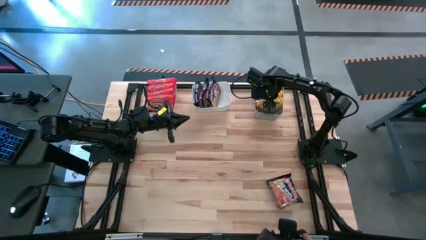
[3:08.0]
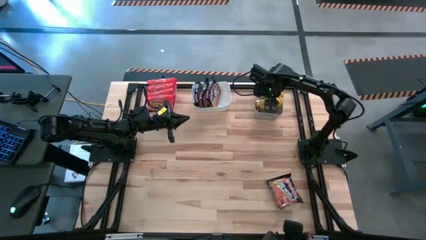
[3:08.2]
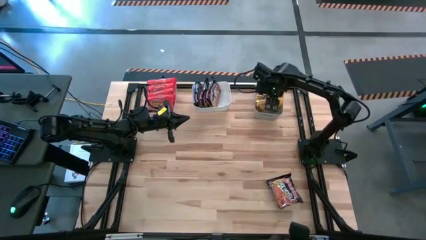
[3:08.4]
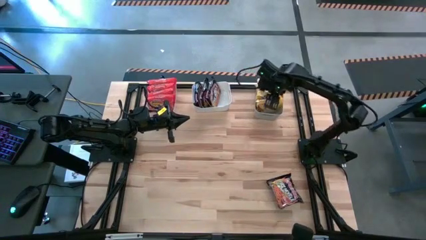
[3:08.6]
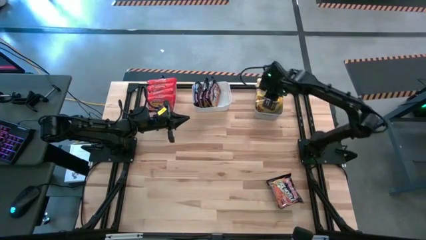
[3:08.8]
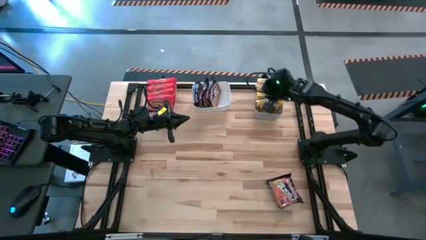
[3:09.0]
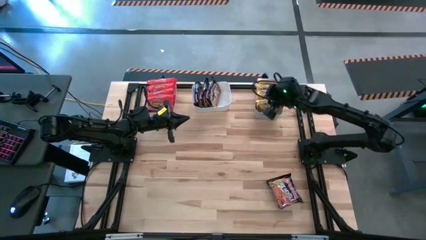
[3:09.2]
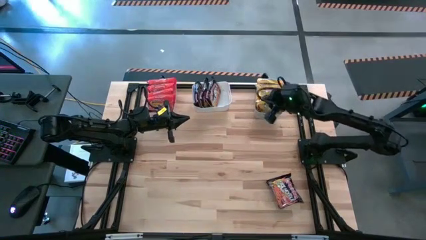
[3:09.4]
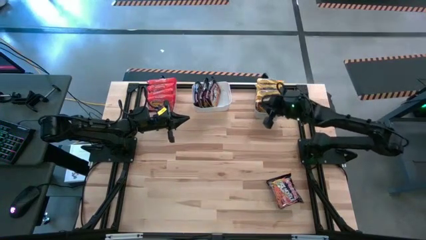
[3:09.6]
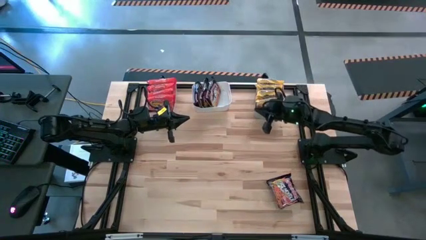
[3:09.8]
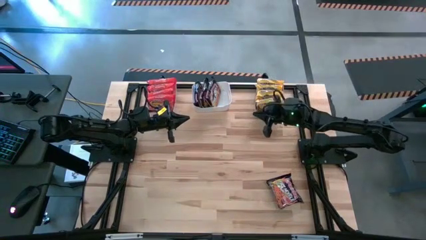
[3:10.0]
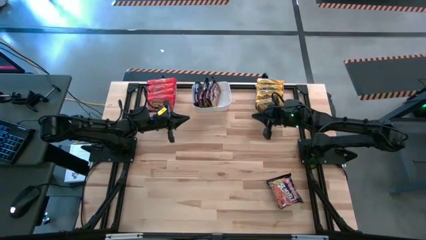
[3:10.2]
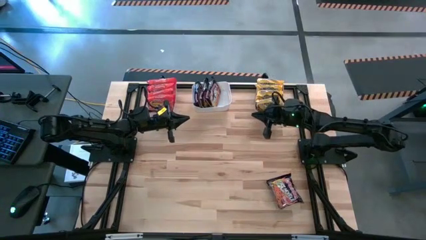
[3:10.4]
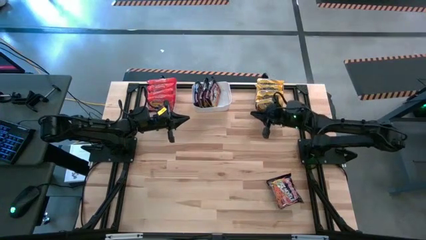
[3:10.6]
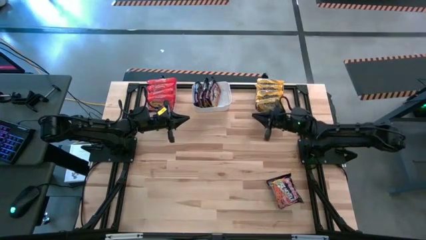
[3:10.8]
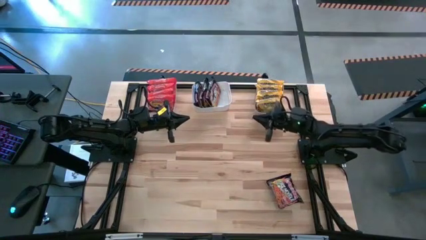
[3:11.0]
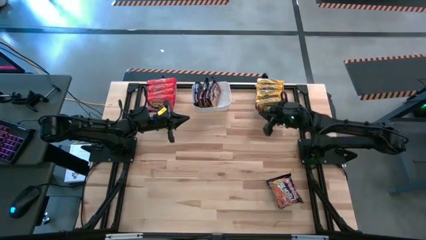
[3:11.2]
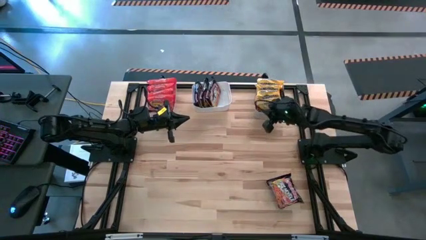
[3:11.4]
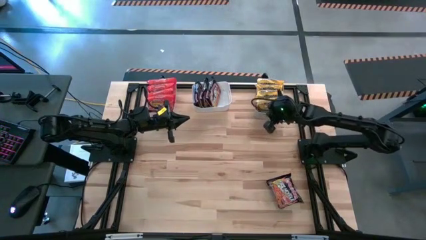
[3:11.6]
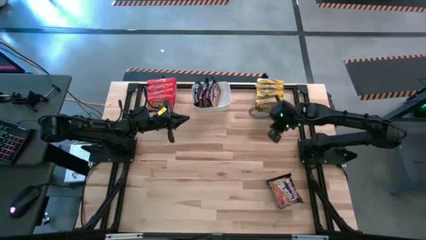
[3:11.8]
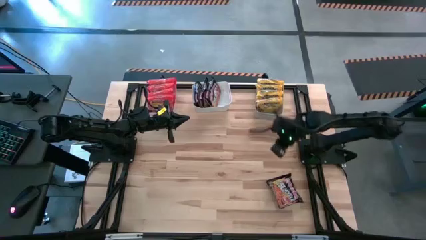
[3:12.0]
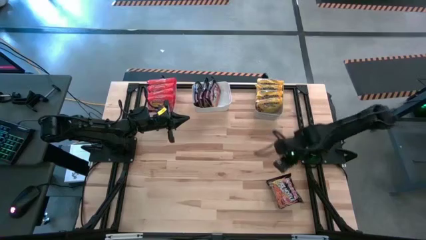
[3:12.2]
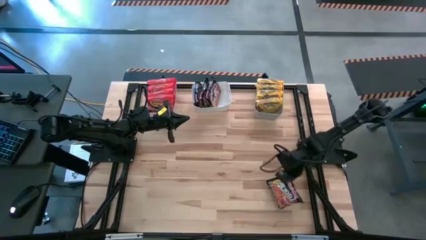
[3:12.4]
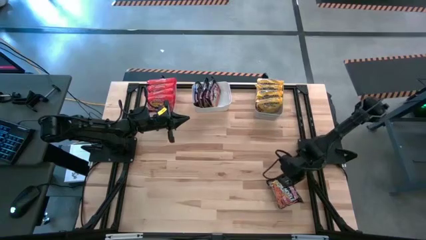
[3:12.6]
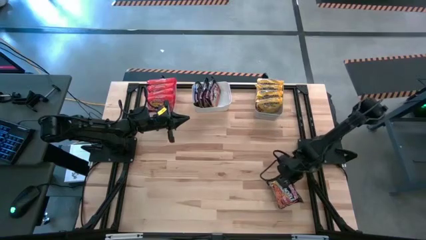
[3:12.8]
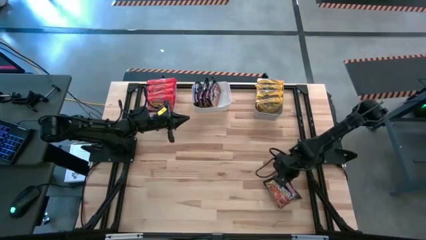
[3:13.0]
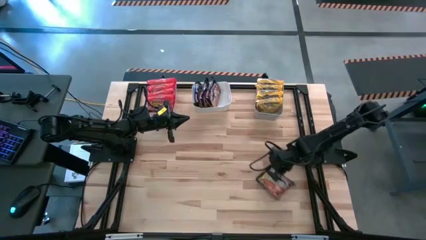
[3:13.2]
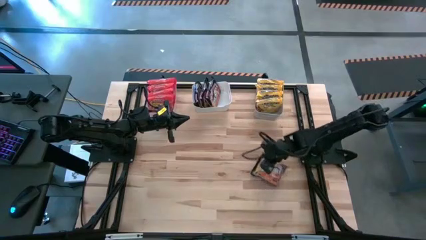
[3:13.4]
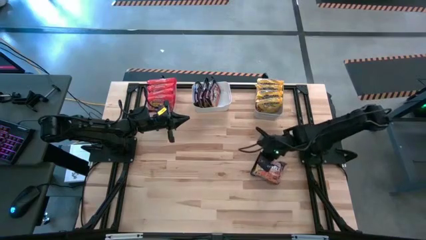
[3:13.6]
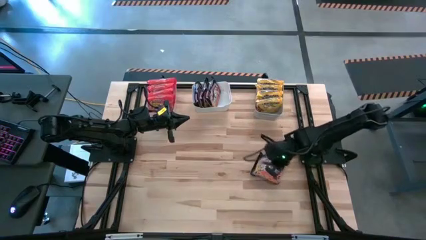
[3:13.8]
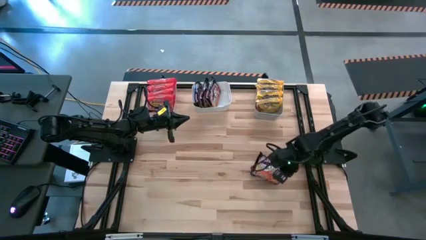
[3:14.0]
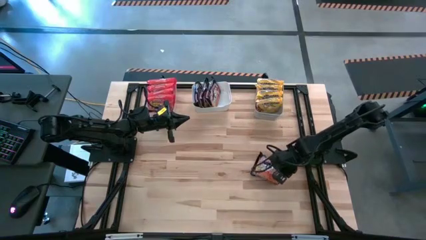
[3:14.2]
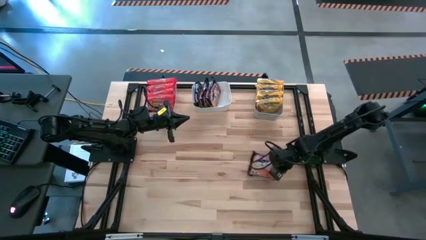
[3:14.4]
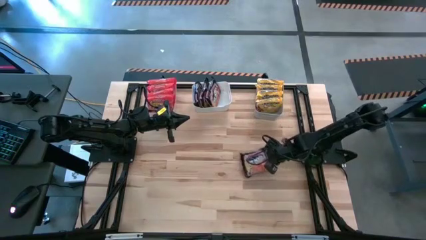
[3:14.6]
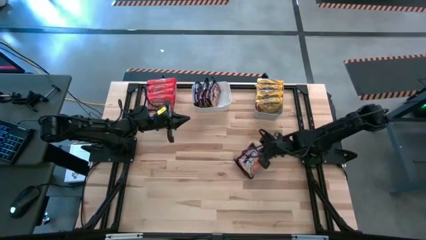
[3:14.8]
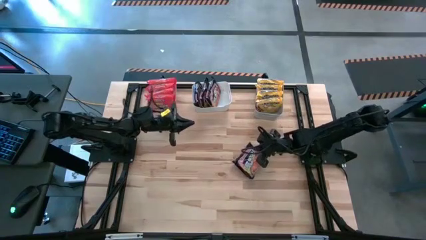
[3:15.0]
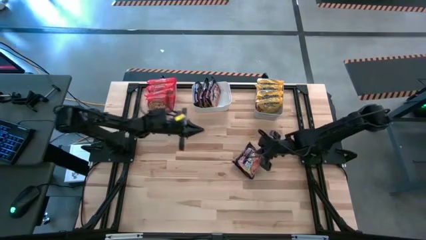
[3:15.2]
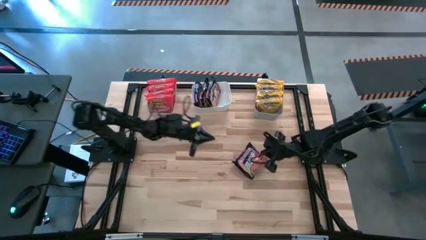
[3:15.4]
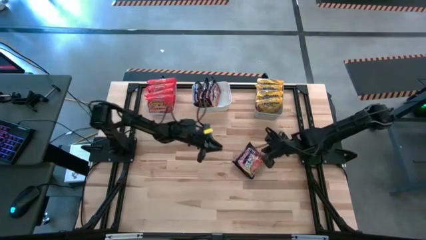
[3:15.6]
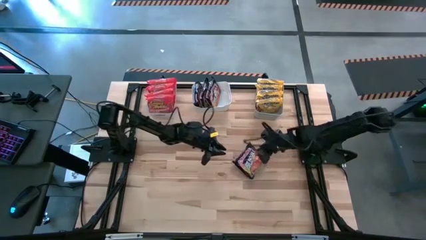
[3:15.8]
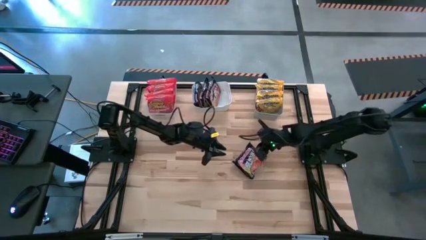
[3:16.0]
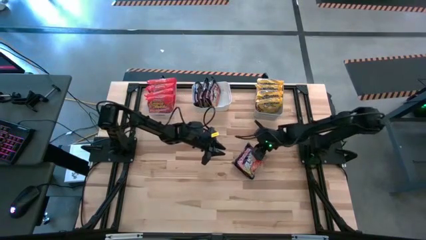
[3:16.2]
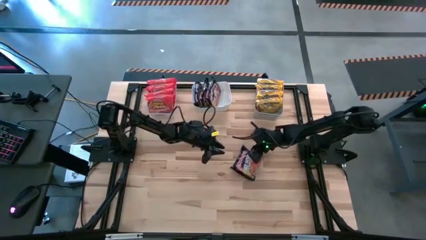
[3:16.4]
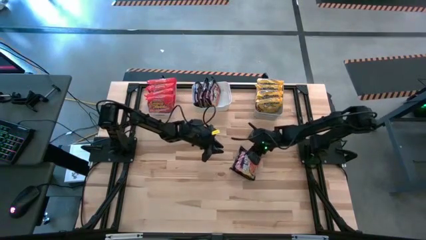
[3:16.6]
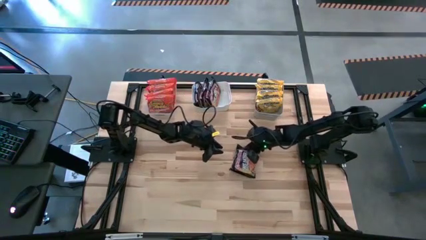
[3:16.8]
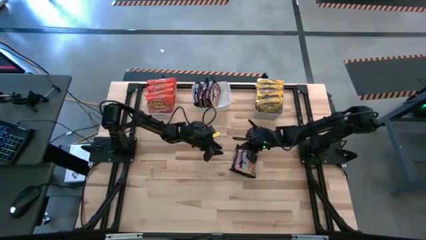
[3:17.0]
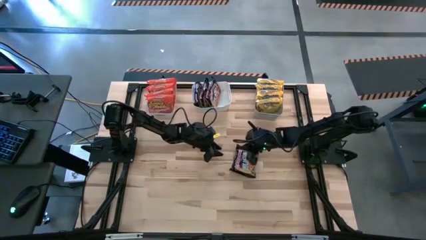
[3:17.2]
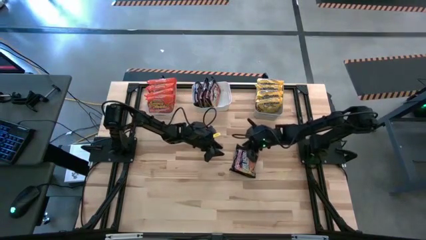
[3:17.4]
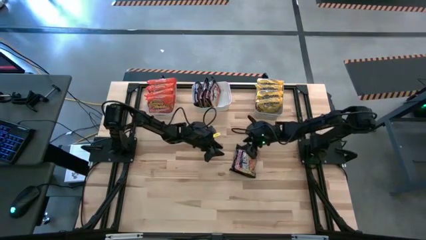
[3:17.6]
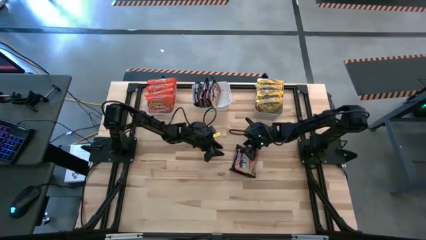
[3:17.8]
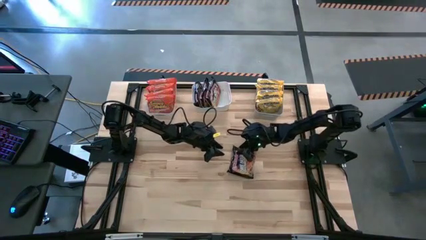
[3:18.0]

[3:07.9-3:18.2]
Task: Sort Maruchan noodles
Put the black noodle pack into the white bin

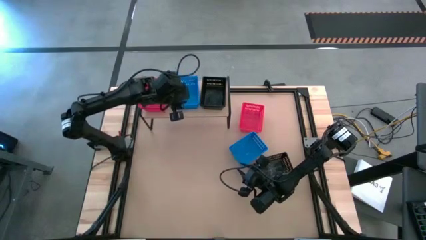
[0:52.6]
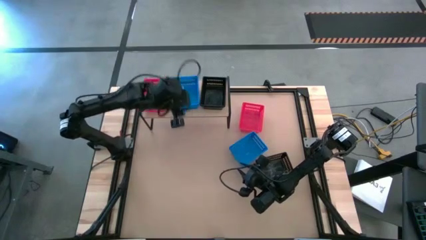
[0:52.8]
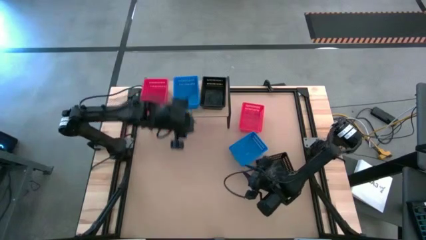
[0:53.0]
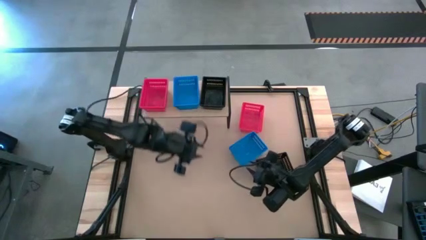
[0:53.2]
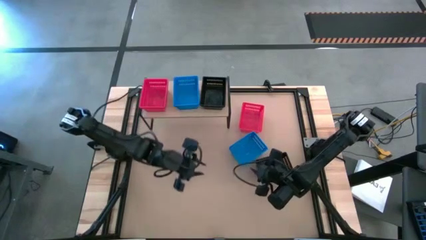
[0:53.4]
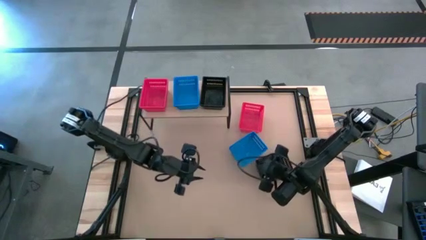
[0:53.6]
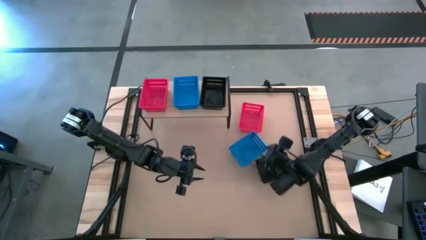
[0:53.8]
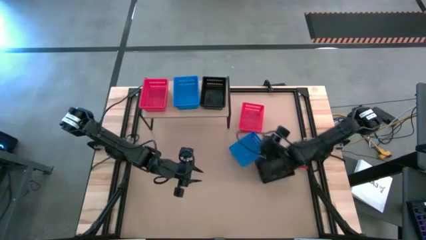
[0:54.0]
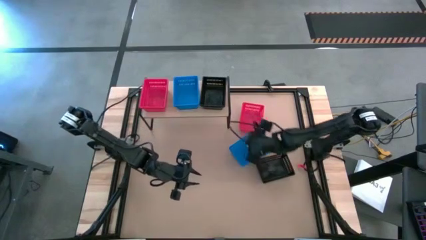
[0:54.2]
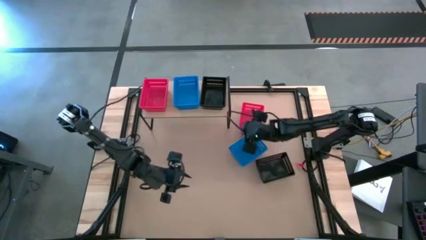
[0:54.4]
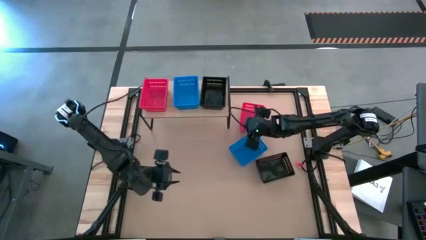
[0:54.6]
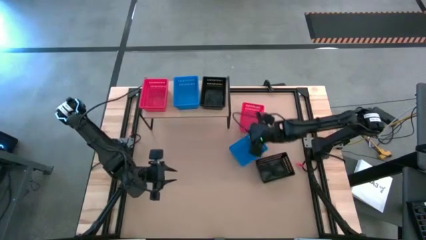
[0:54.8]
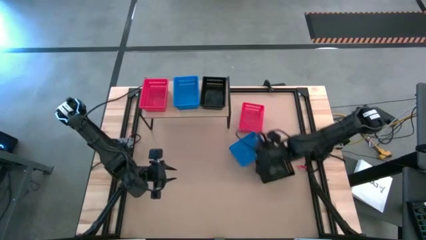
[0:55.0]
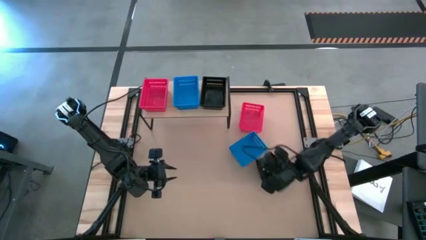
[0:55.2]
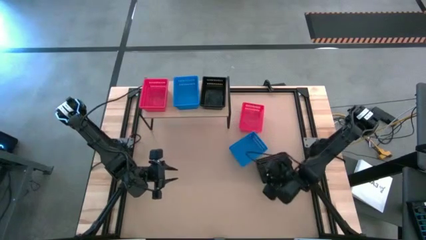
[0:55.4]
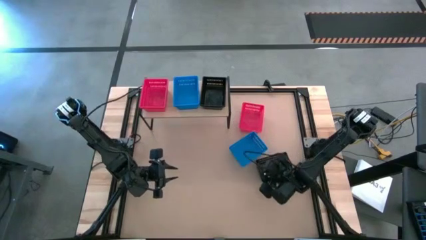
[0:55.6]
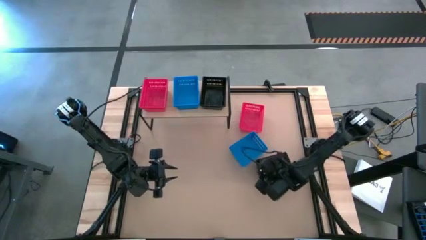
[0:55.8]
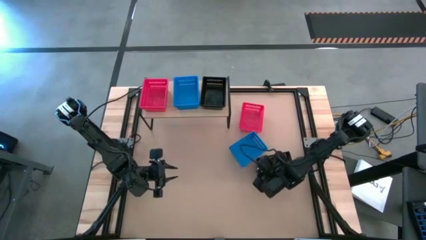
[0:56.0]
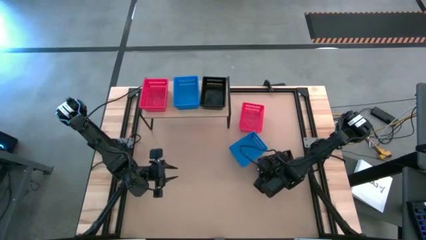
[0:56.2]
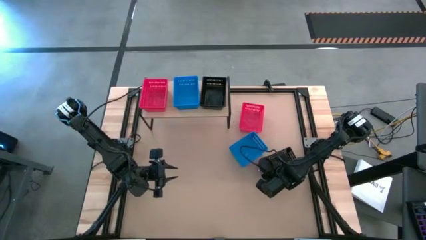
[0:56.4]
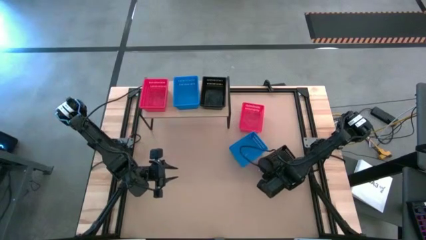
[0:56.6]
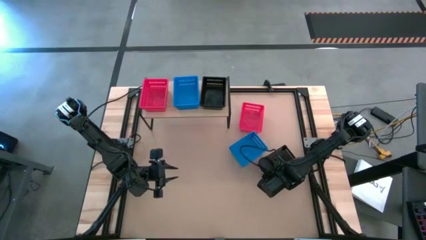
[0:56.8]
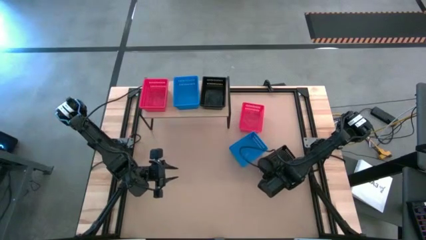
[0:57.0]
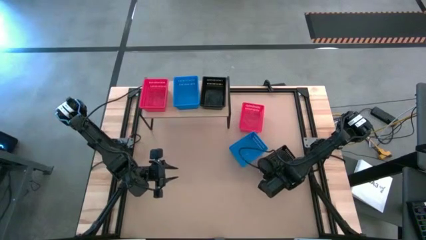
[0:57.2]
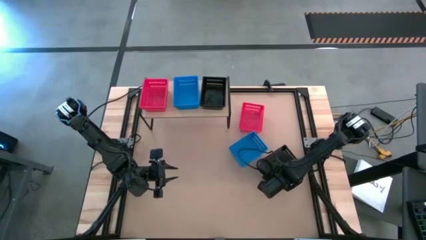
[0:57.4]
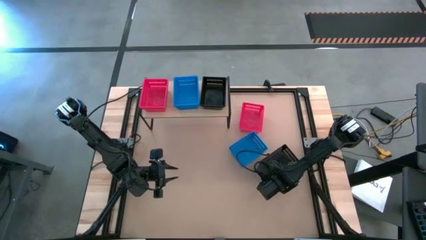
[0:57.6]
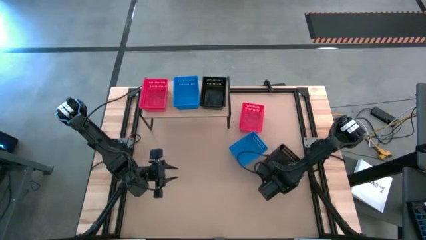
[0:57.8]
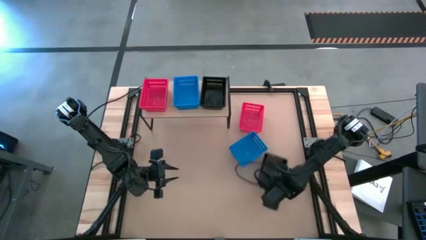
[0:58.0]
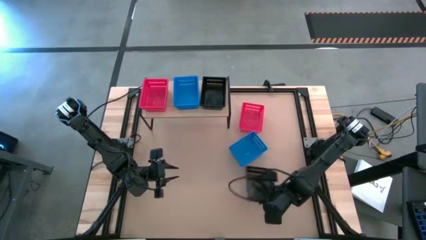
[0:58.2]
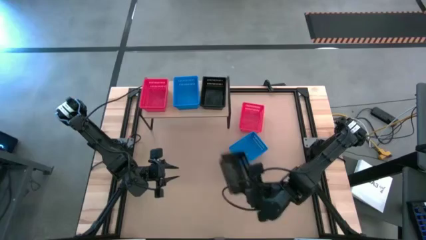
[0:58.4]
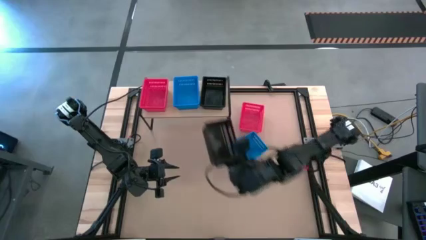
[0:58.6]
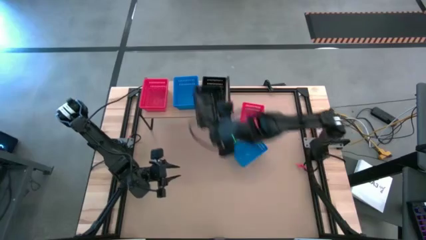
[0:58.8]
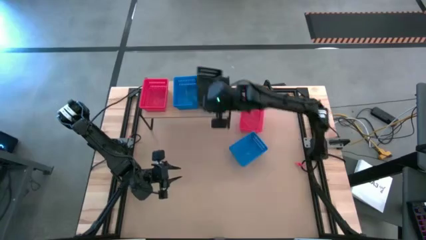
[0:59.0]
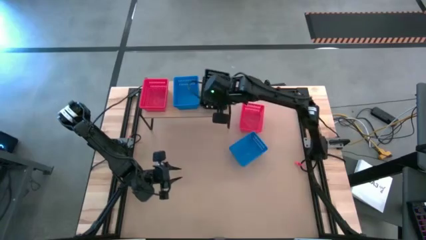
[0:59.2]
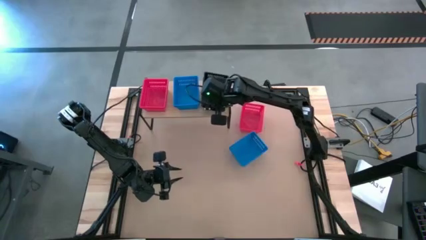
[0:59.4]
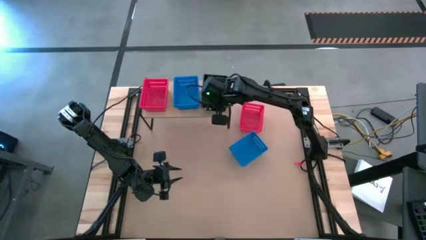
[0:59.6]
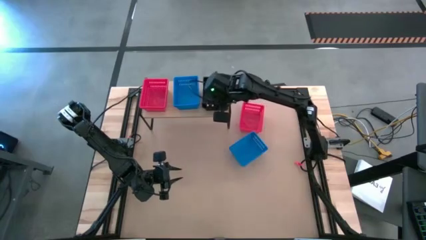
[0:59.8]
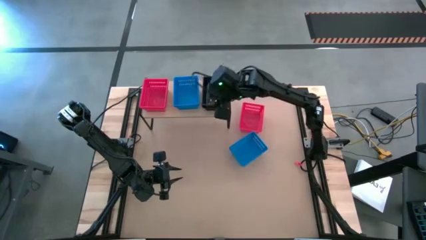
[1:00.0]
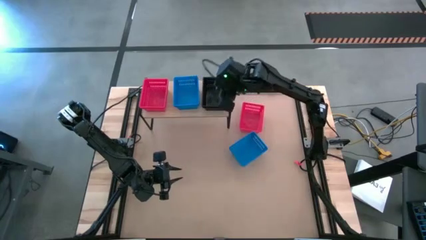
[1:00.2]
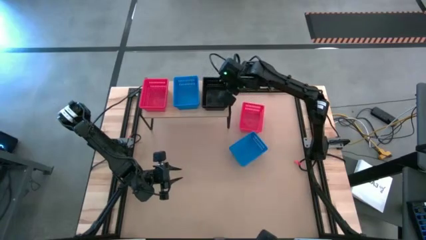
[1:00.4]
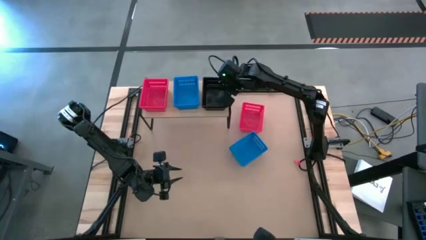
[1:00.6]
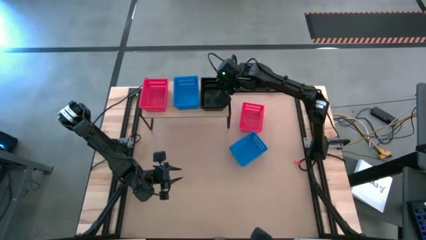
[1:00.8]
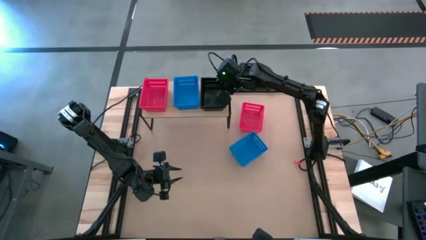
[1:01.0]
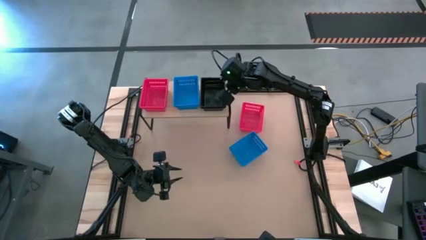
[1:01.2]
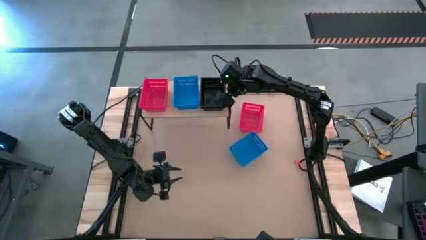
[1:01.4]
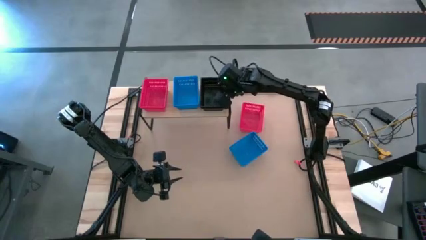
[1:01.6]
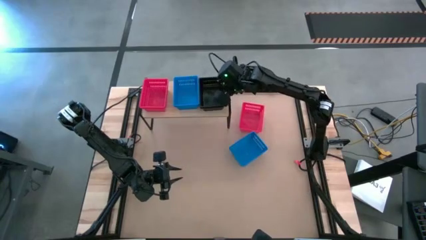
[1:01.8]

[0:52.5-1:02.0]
Task: Stack baskets on shelf by color
Stack the black bin on top of the black bin on the shelf
